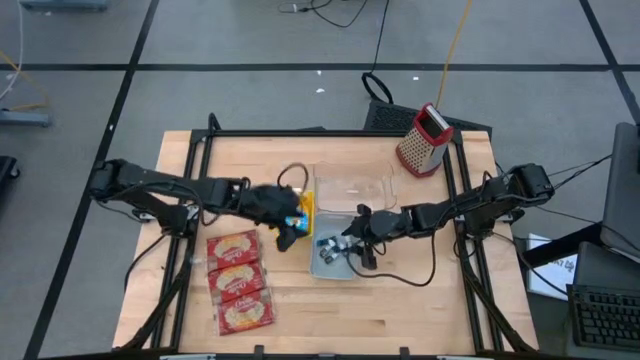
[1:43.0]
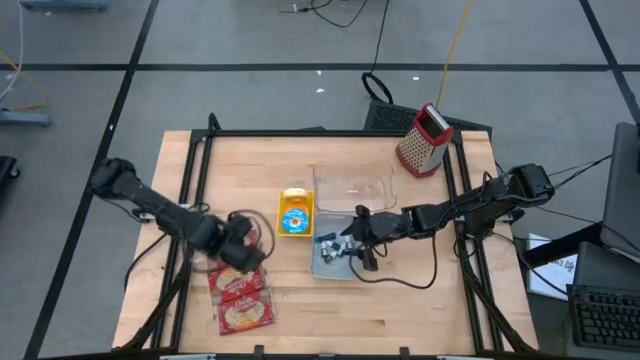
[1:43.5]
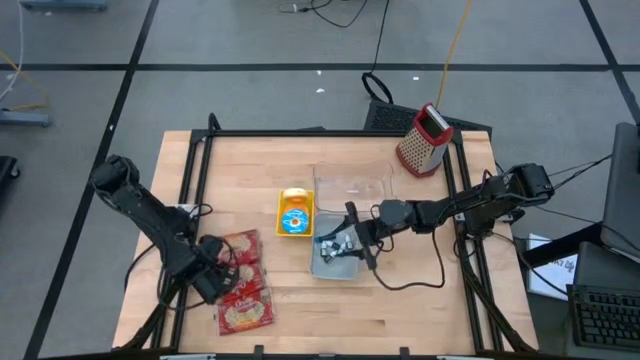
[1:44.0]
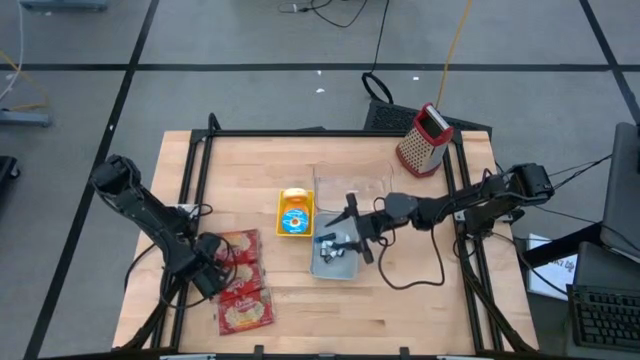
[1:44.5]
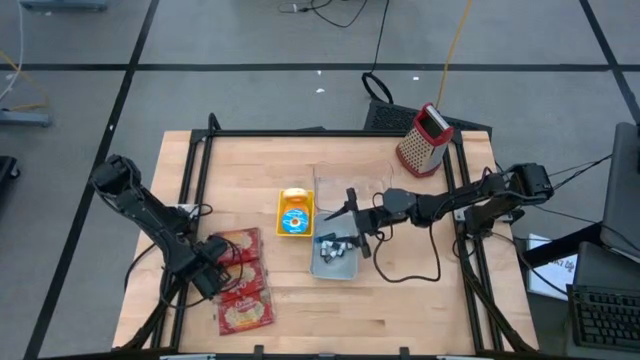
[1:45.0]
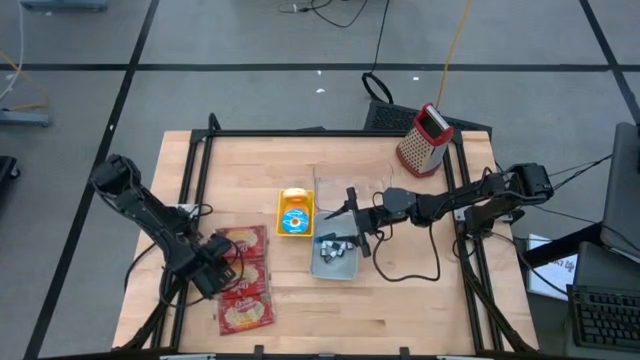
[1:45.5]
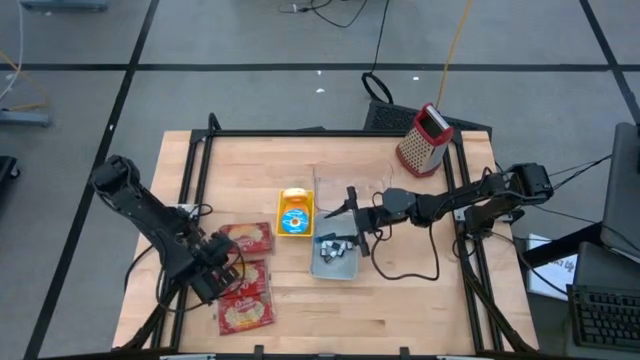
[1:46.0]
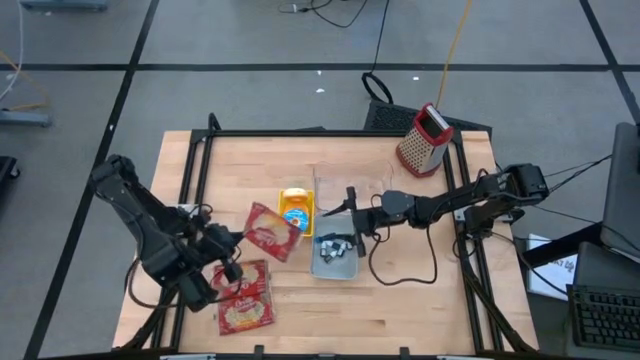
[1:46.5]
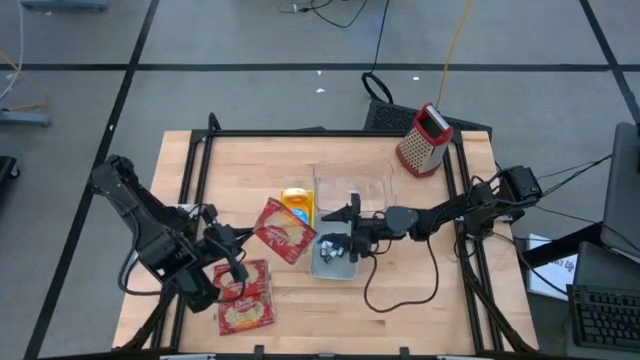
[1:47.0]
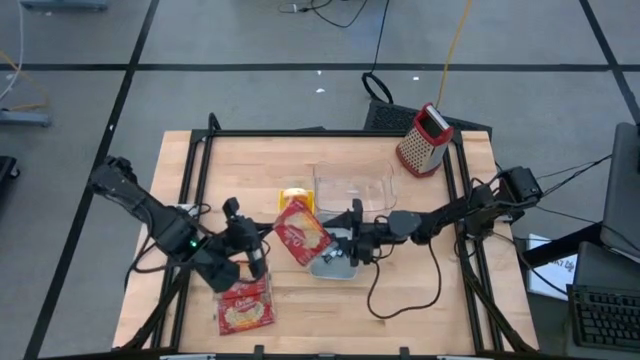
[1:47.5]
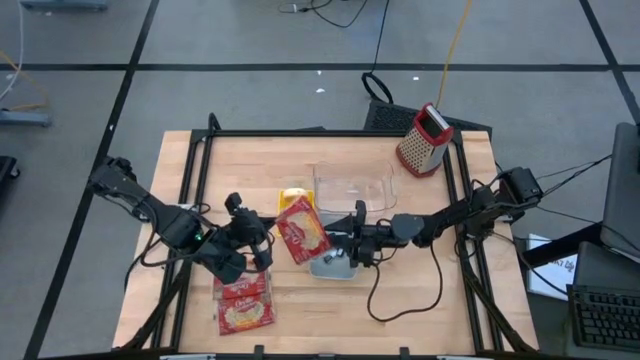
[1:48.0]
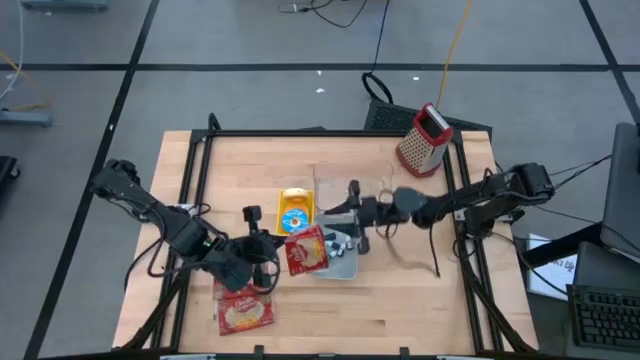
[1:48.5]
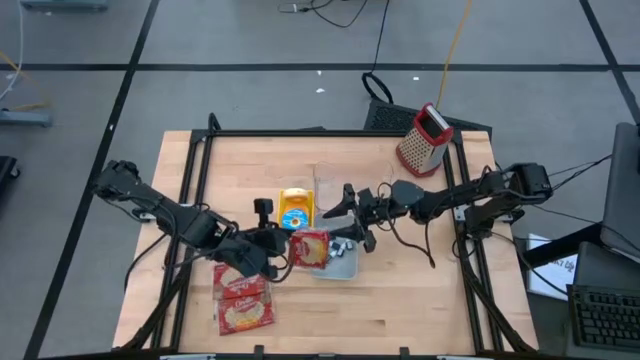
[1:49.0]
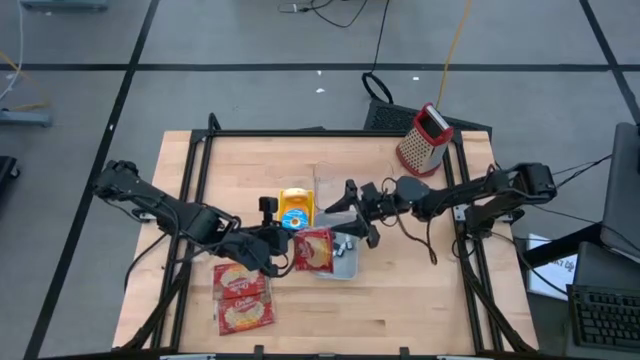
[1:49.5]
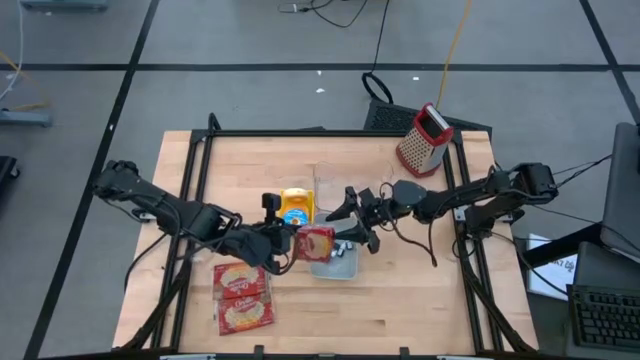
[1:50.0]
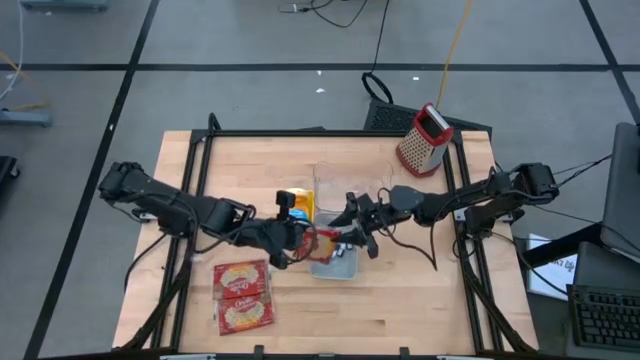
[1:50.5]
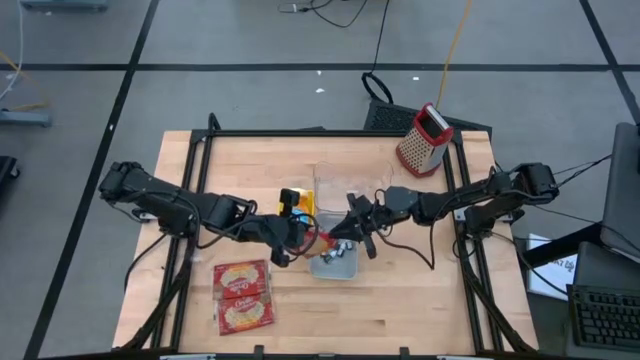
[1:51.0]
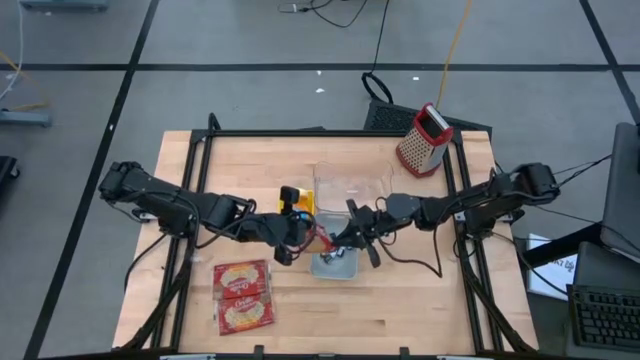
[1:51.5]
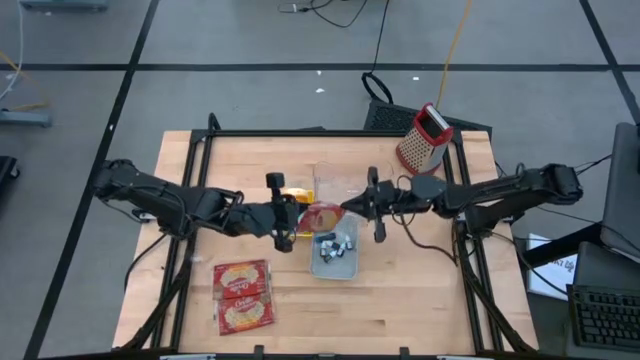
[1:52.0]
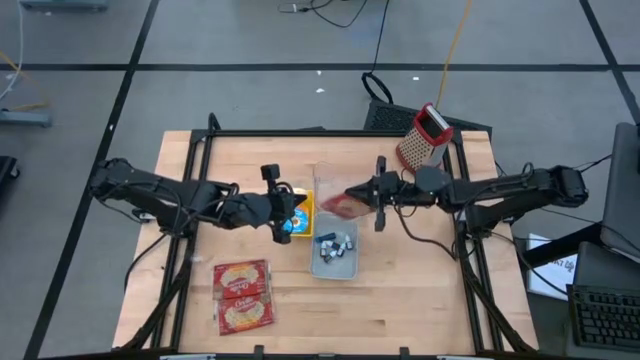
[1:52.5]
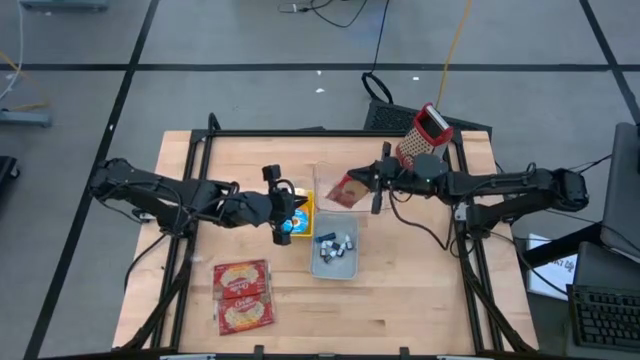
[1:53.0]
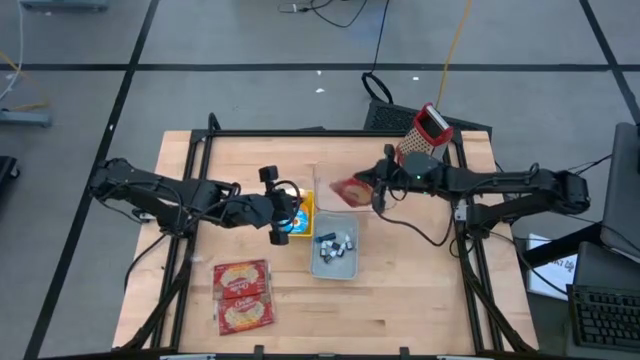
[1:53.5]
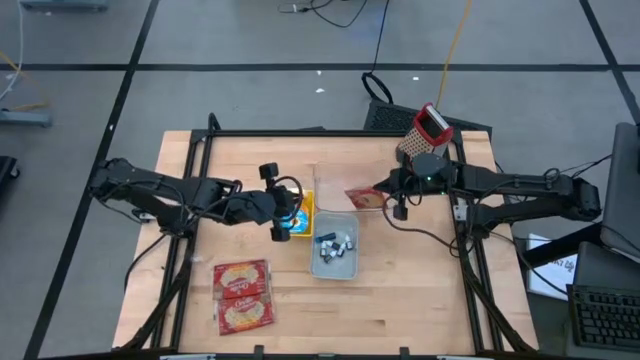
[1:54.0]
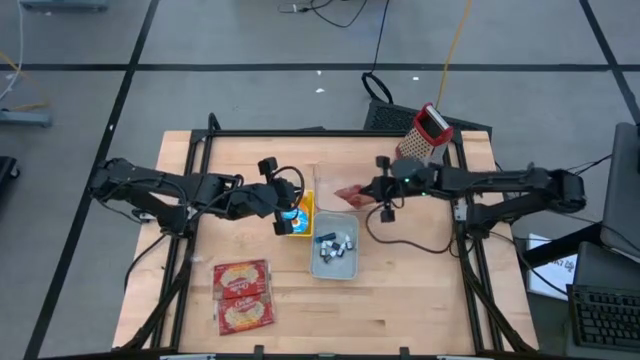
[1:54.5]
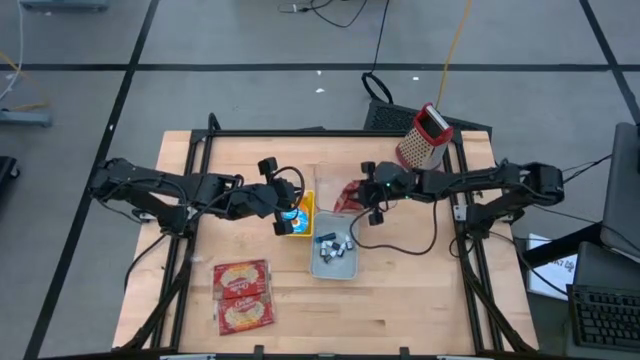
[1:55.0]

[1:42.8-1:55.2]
Put the top red popcorn bag into the transparent bin

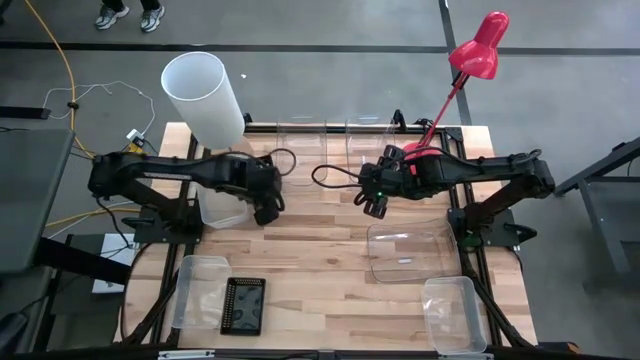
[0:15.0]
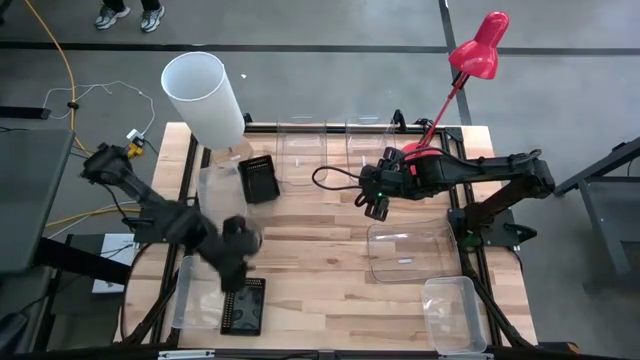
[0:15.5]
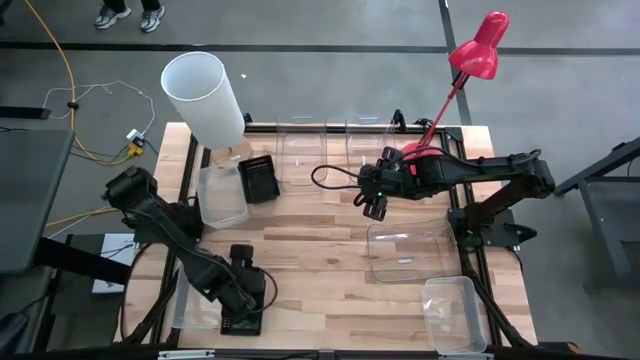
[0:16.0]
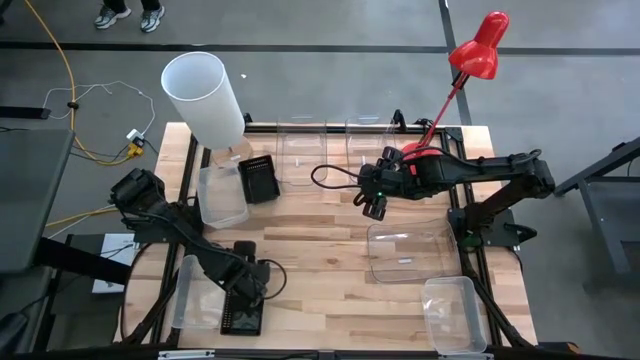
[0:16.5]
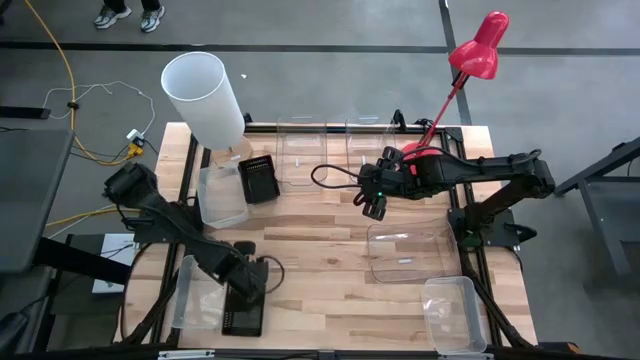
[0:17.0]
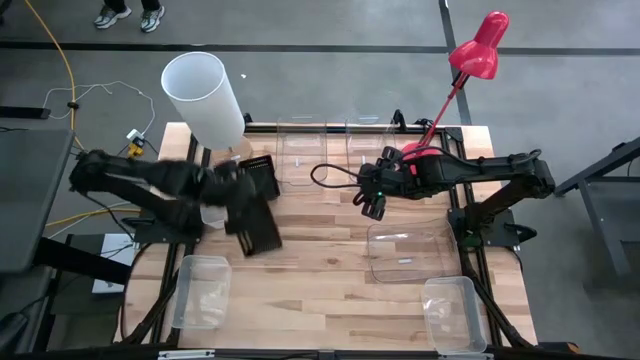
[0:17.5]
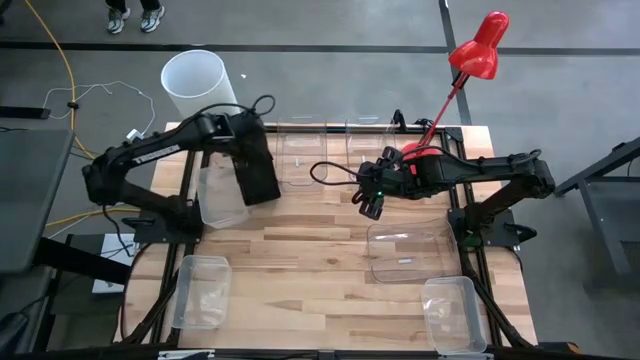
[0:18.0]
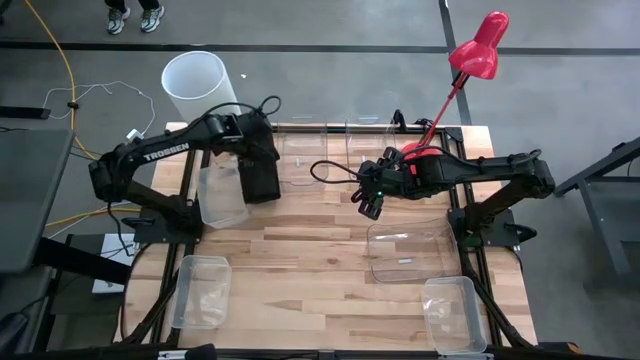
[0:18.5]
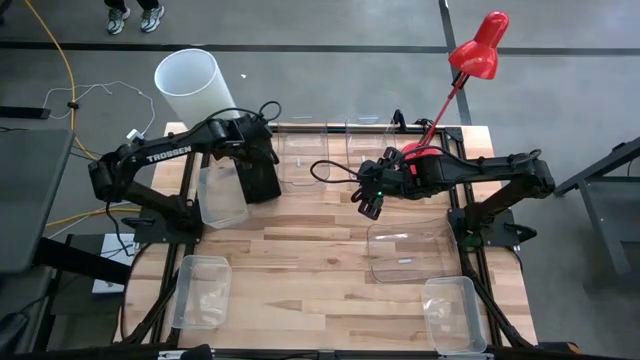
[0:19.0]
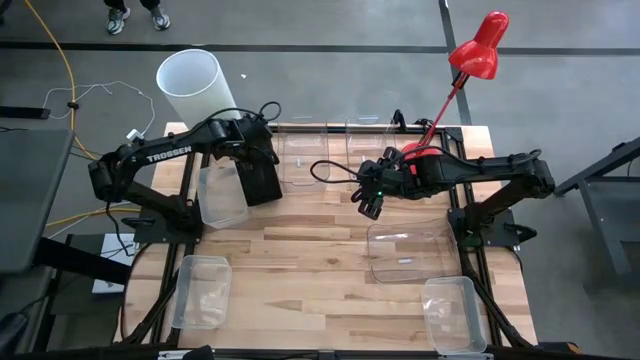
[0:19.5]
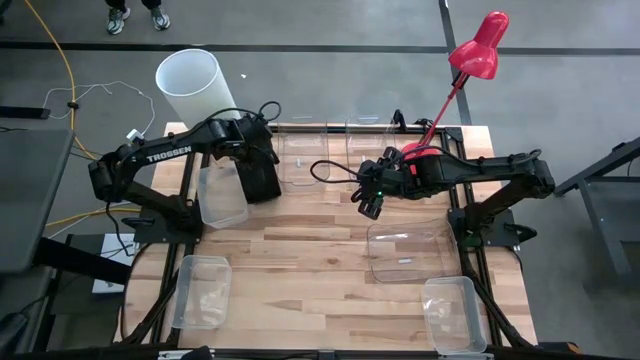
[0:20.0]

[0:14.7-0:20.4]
Stack the bottom black bin on the black bins
